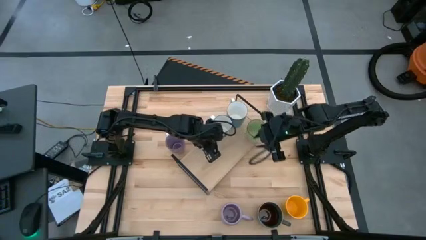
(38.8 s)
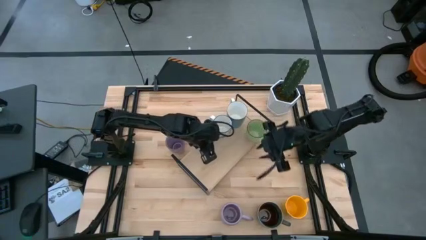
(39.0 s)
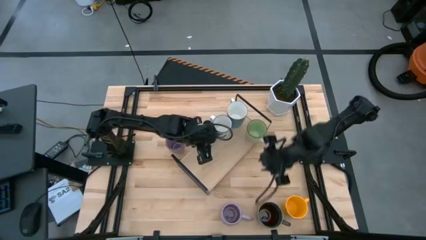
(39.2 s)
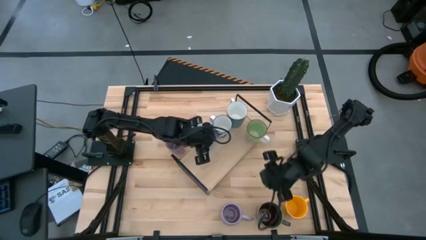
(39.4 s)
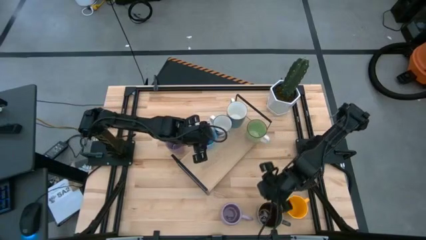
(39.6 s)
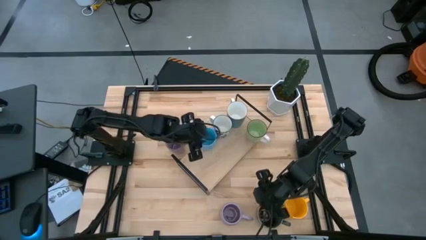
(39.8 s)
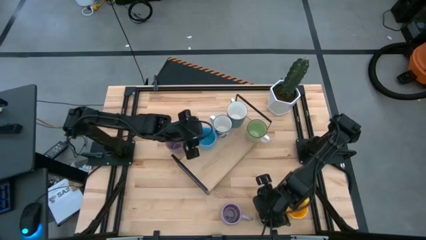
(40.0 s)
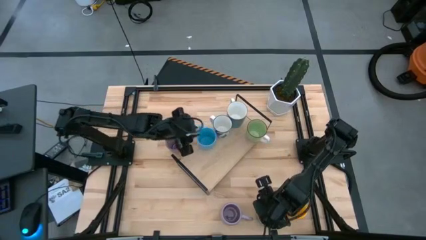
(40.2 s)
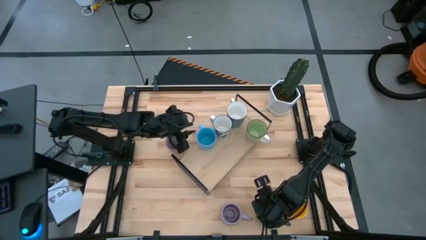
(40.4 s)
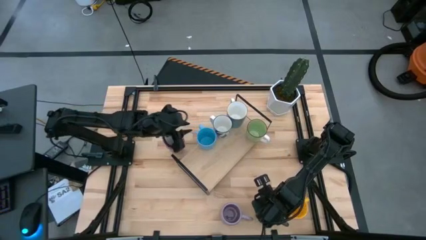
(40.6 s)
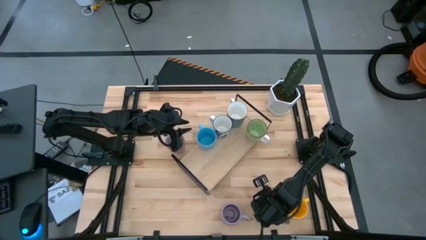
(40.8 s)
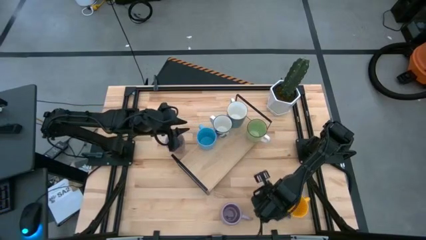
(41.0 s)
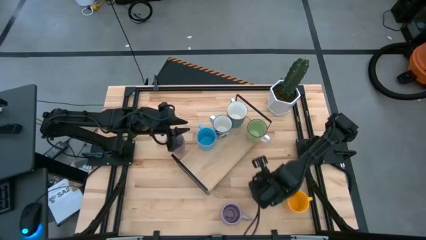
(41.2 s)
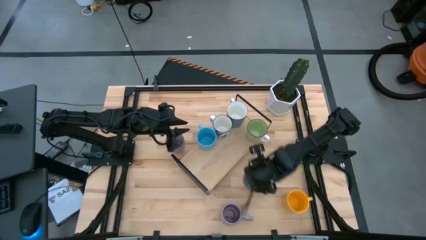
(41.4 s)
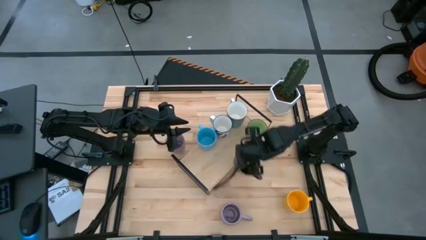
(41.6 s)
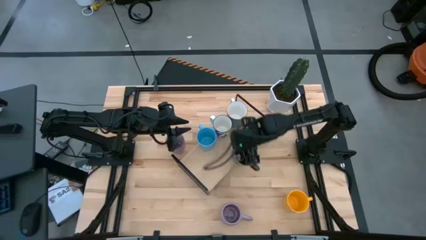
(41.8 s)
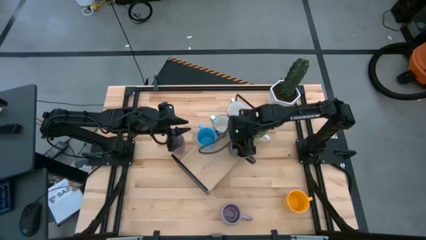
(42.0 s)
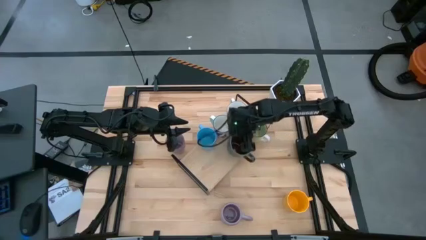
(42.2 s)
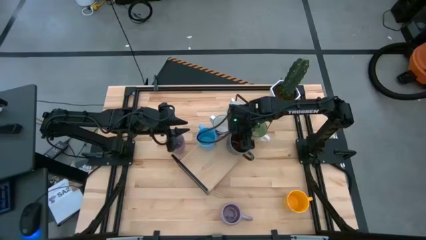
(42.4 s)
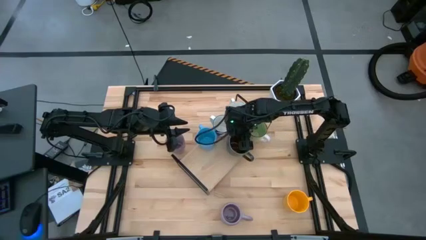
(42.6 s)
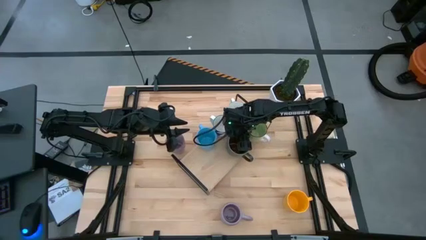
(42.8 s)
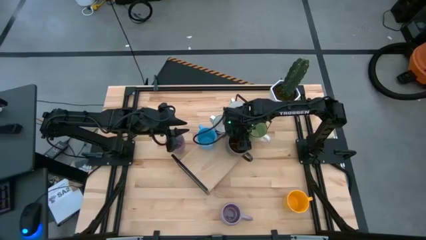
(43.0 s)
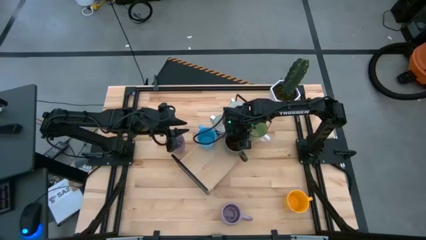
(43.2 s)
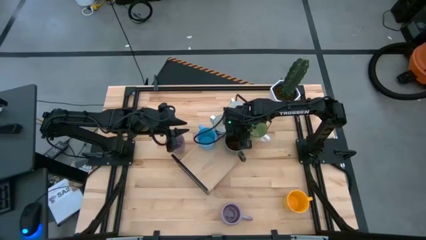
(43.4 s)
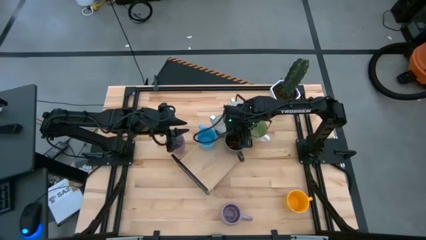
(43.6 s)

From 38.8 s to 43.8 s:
Task: Place coffee mugs
Put the dark green mug on the shelf

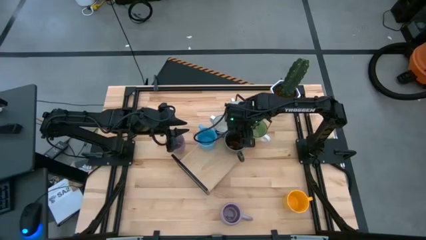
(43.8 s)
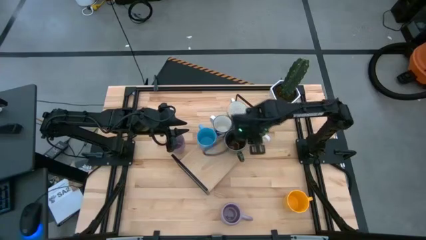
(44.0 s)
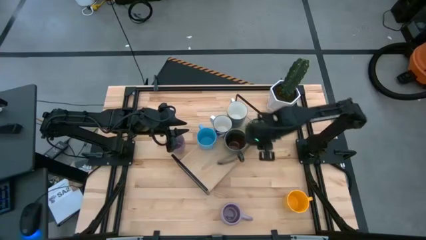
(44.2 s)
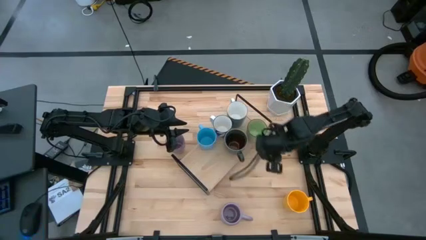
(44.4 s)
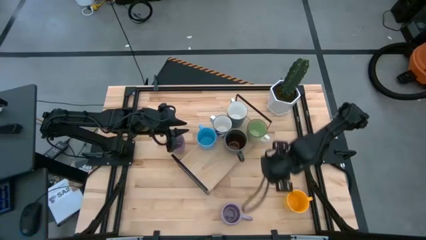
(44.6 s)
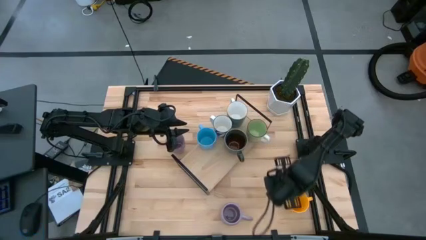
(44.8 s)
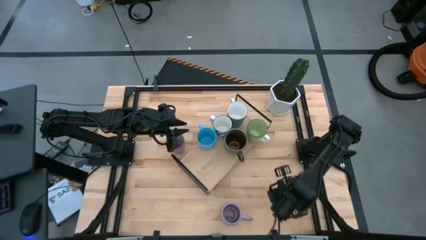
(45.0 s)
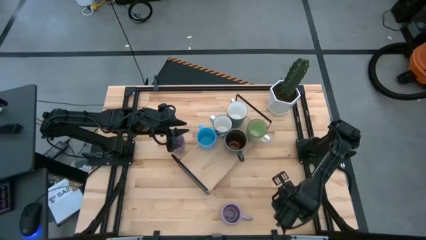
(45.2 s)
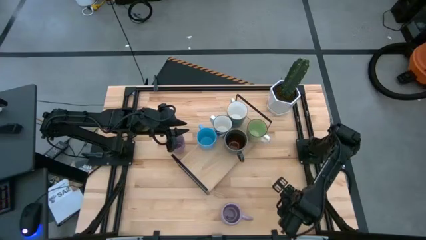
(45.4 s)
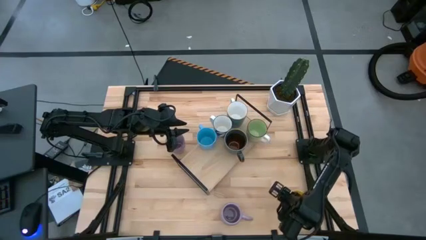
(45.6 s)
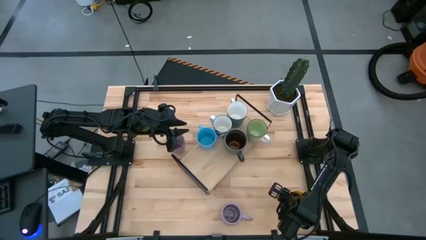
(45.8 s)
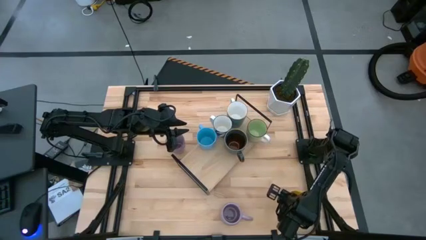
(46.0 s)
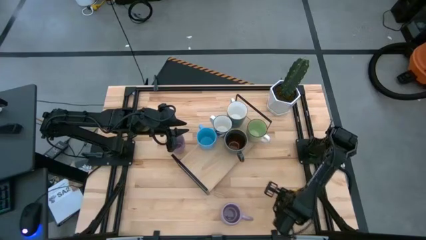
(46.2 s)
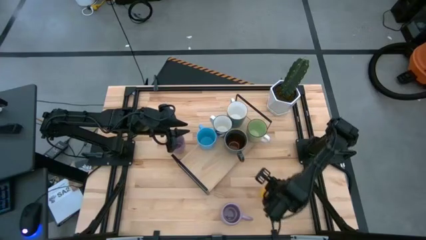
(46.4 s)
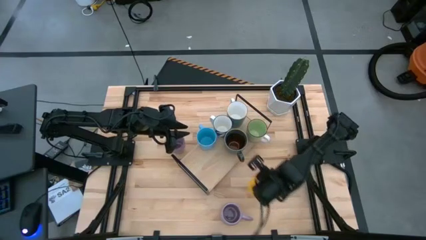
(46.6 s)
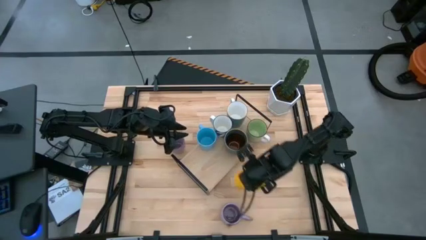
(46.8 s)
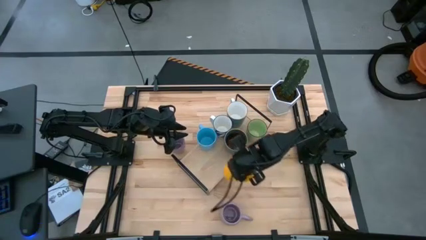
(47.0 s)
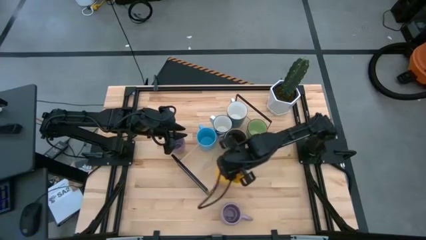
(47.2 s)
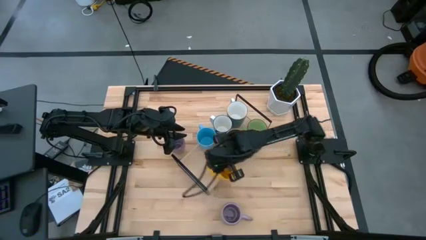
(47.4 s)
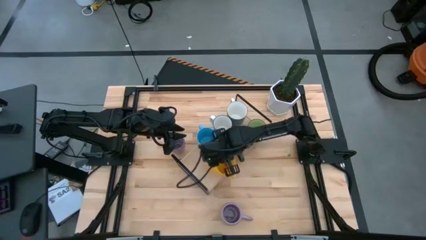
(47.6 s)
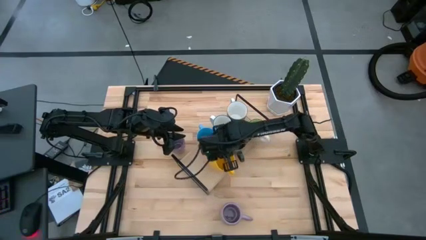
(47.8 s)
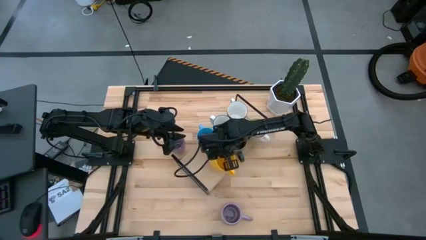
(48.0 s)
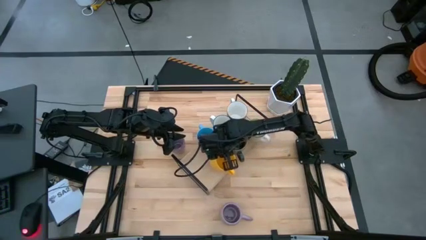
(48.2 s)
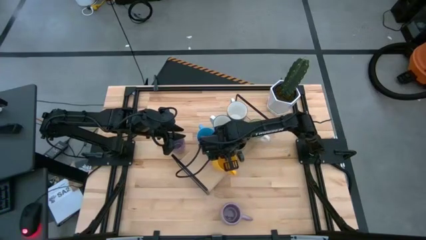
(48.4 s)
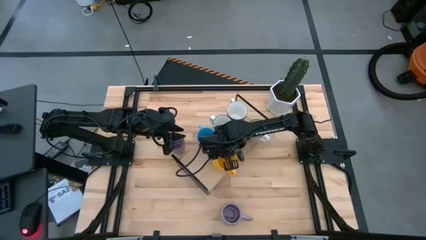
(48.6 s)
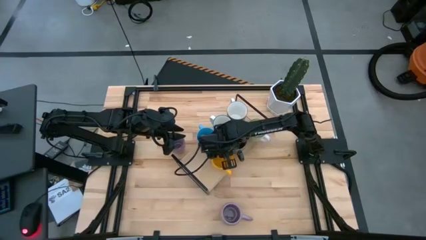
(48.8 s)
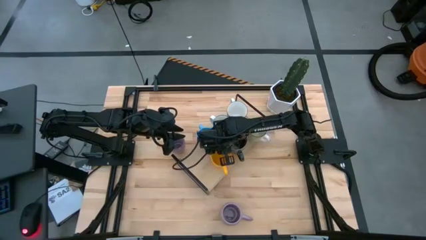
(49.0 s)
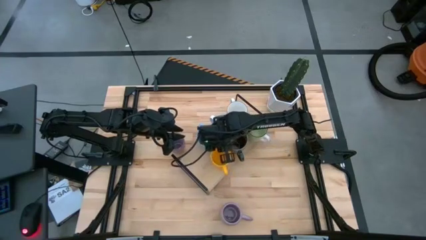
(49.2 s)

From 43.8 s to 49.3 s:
Put the yellow mug on the shelf

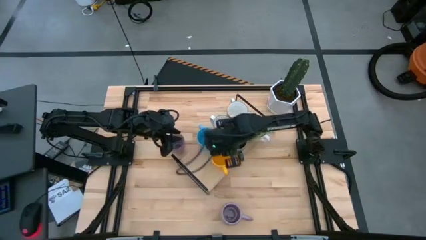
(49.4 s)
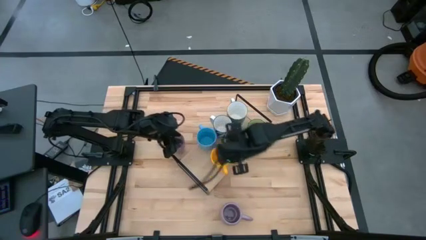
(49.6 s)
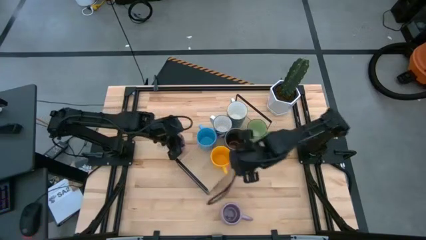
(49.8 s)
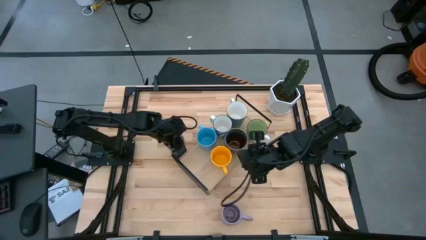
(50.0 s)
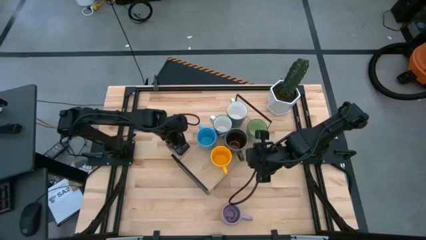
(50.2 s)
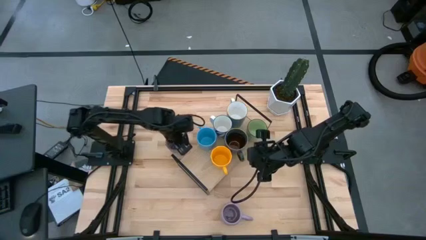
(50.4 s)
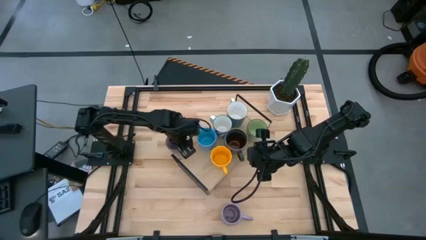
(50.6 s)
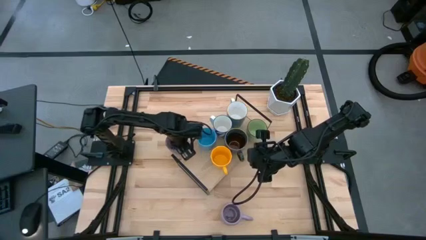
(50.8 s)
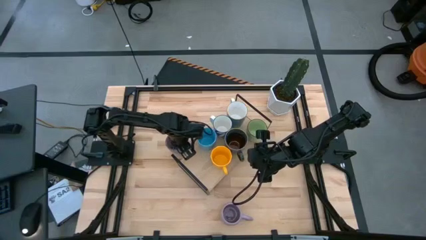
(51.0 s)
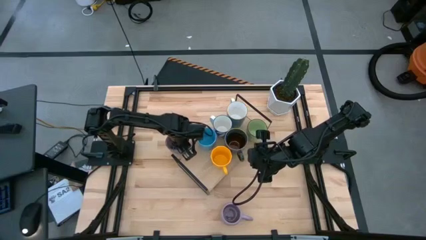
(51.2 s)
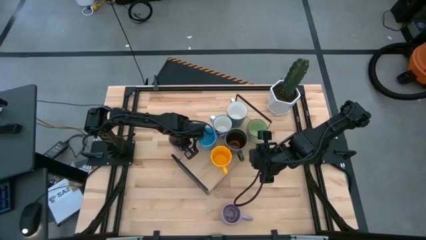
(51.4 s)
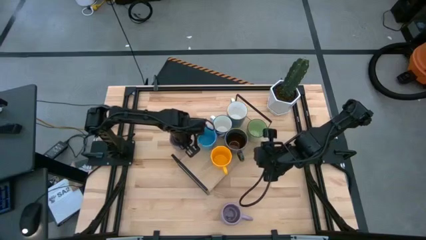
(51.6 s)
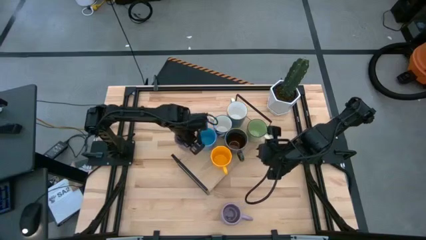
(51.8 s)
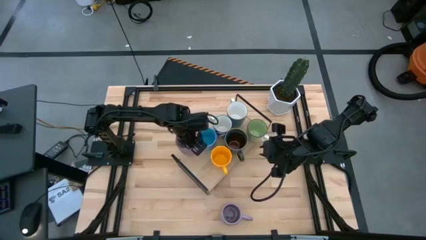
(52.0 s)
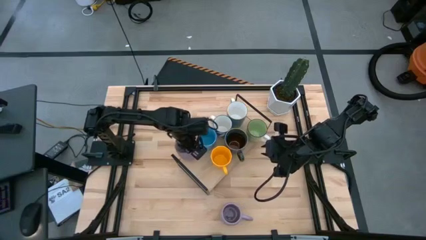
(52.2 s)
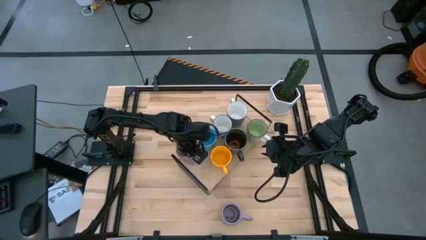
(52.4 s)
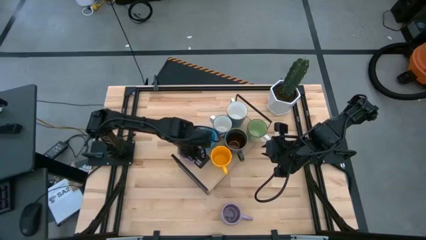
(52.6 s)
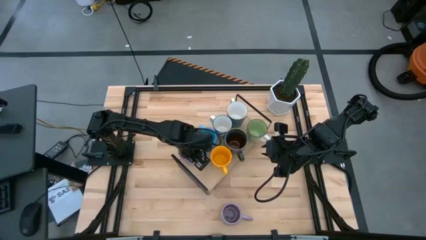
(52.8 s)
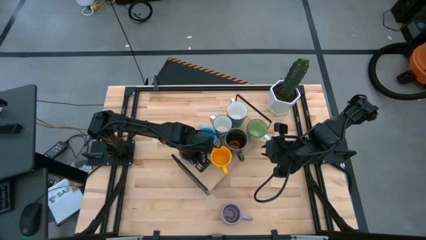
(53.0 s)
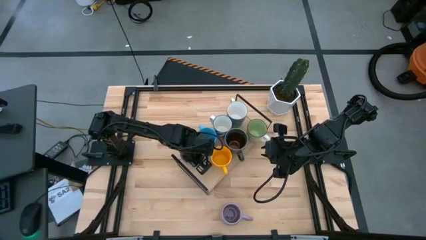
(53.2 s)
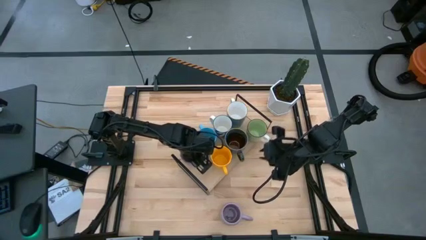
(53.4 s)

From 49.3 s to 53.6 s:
Put the top purple cup on the shelf

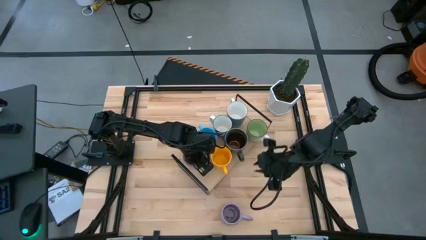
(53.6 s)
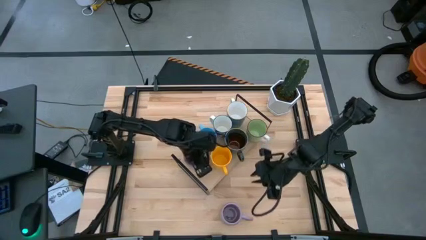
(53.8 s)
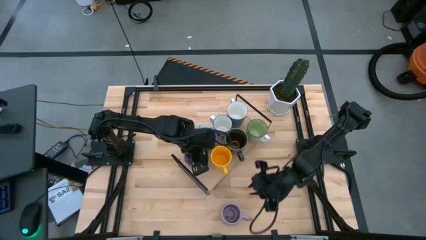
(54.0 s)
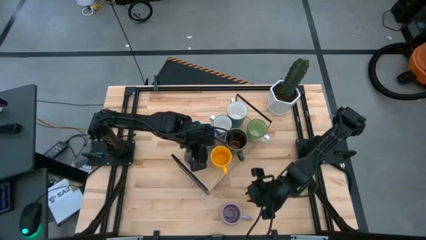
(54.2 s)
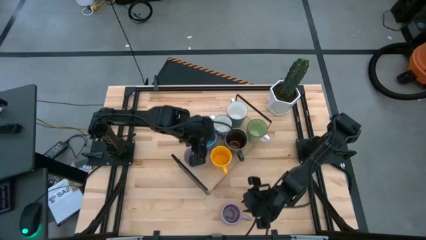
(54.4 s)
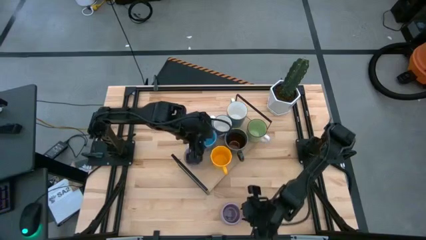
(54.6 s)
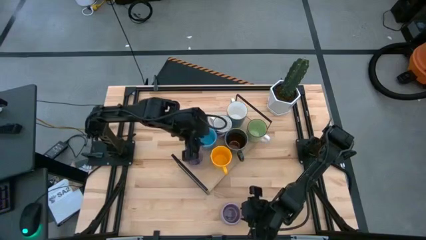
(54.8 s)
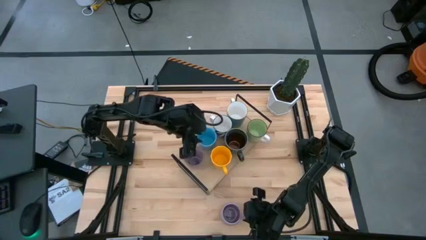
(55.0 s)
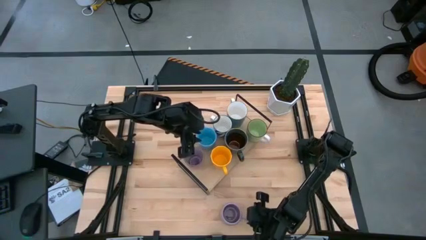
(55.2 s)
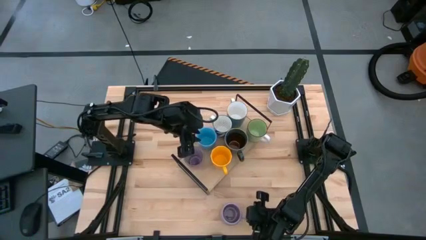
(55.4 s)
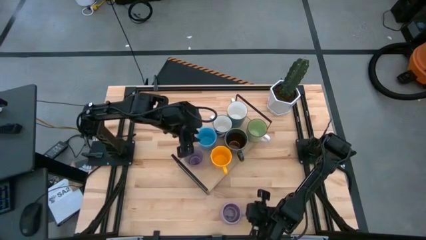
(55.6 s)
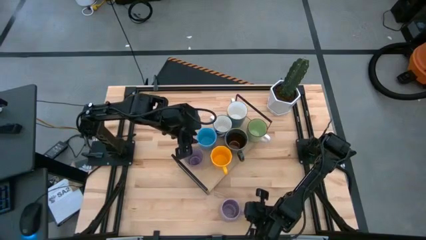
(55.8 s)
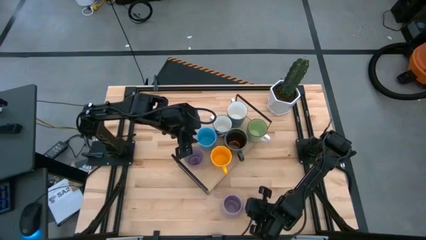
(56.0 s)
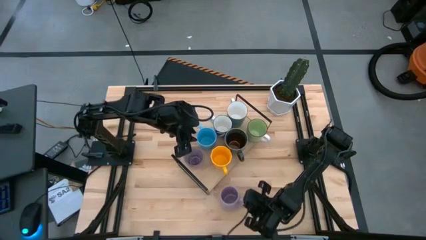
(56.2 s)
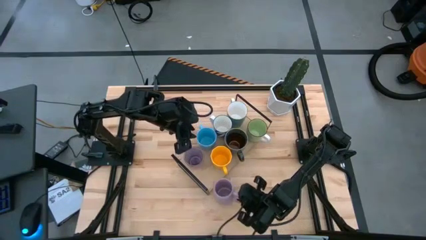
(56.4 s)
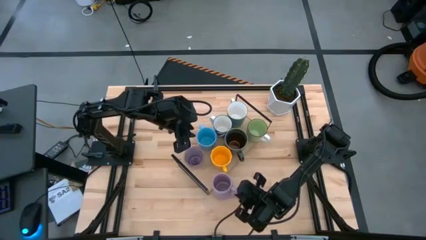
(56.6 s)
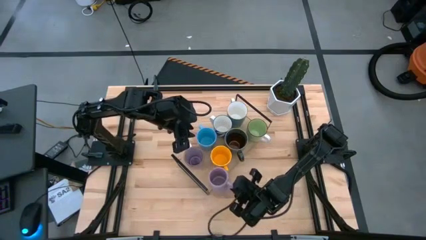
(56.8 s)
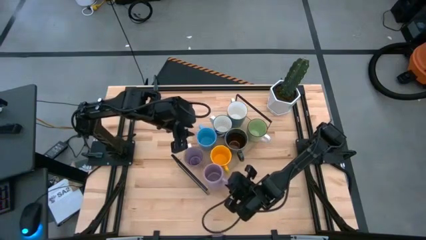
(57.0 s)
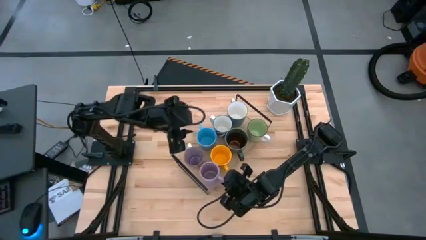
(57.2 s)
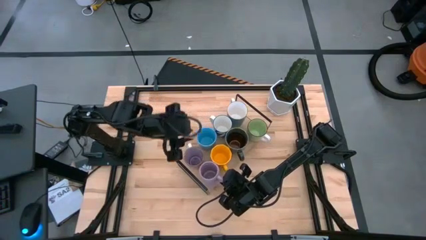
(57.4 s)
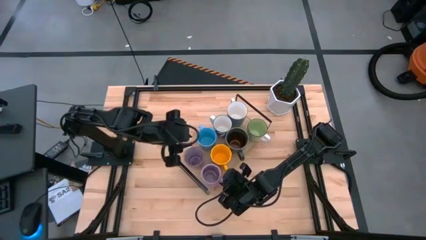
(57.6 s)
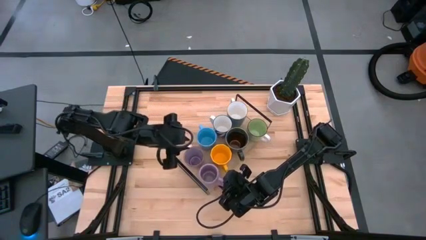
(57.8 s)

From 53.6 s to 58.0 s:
Put the purple cup on the shelf
